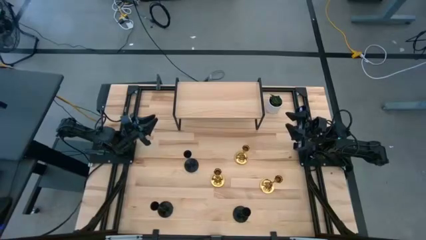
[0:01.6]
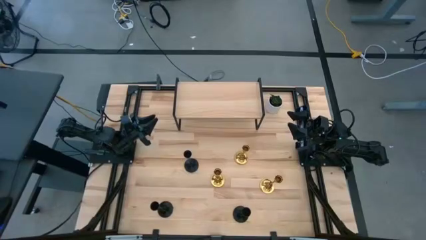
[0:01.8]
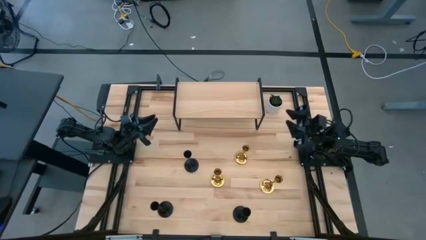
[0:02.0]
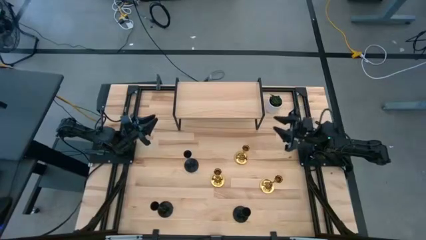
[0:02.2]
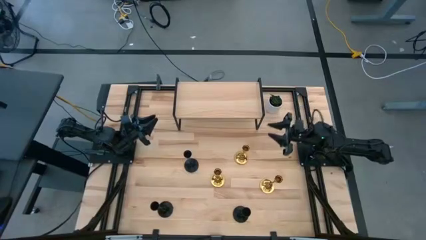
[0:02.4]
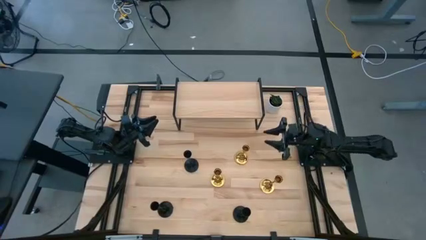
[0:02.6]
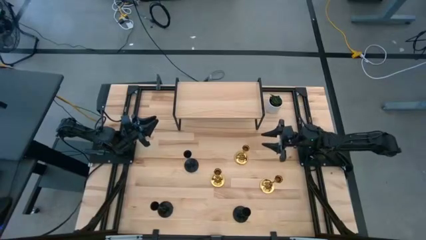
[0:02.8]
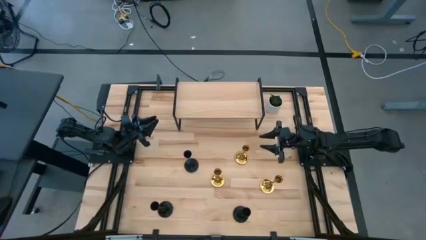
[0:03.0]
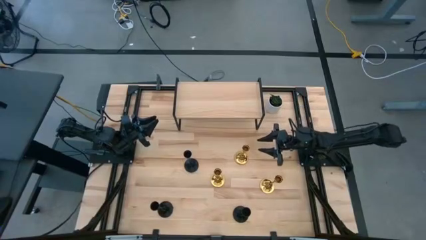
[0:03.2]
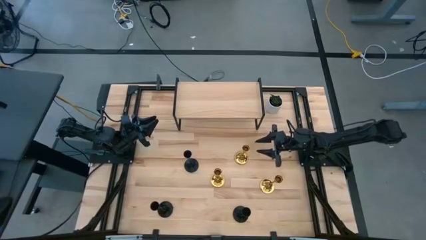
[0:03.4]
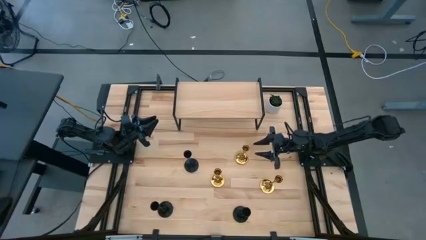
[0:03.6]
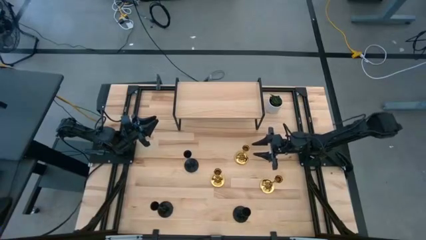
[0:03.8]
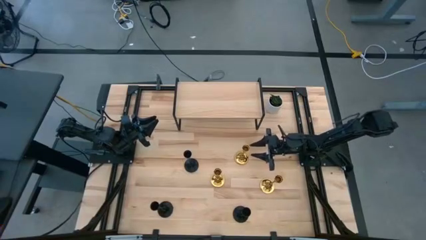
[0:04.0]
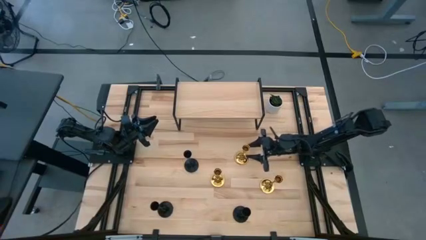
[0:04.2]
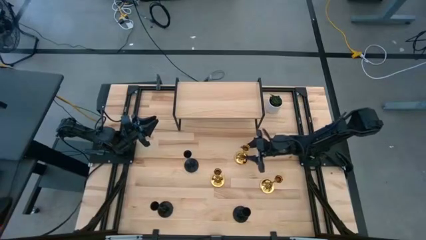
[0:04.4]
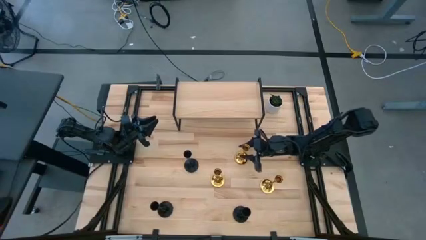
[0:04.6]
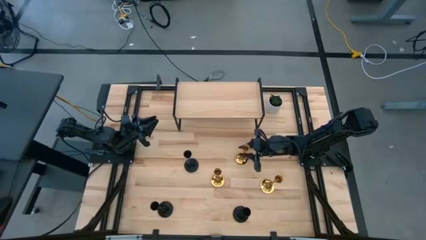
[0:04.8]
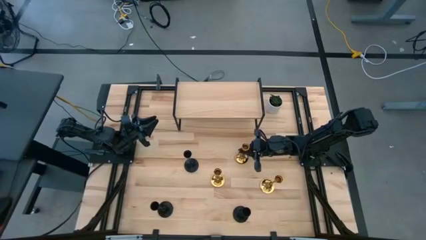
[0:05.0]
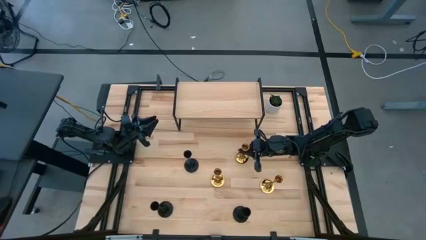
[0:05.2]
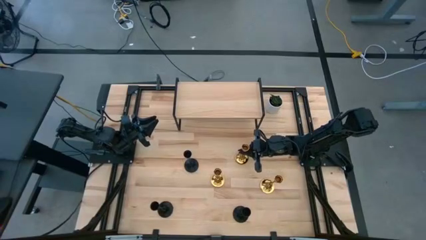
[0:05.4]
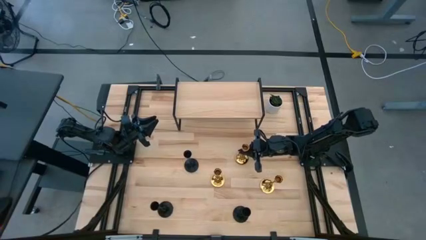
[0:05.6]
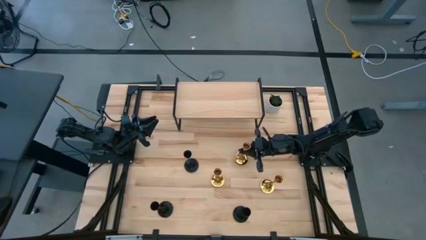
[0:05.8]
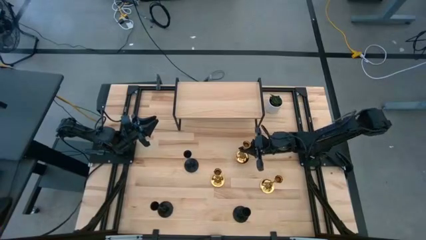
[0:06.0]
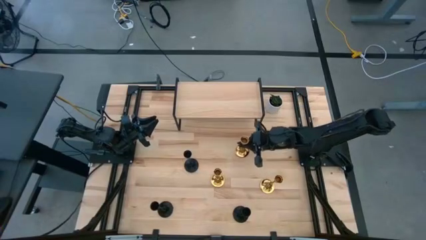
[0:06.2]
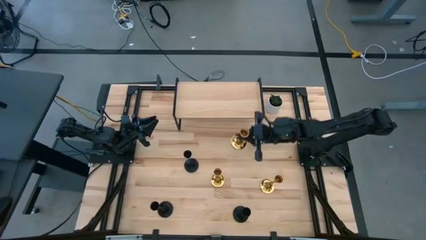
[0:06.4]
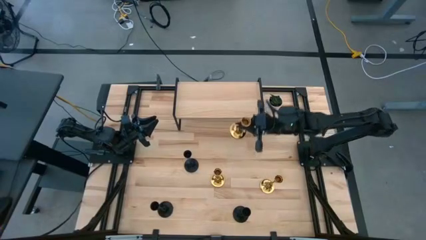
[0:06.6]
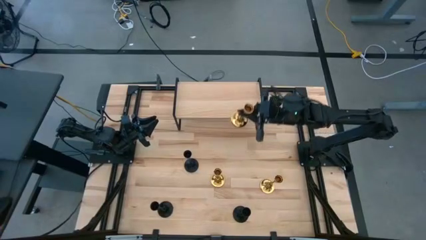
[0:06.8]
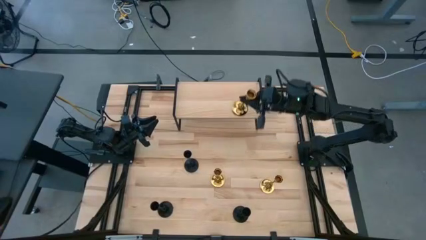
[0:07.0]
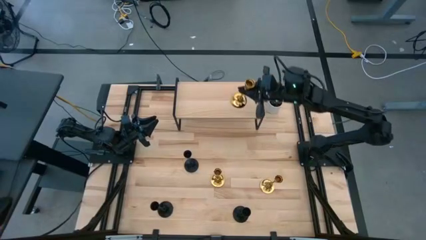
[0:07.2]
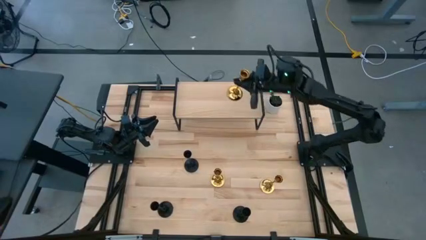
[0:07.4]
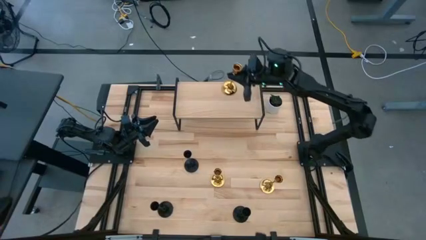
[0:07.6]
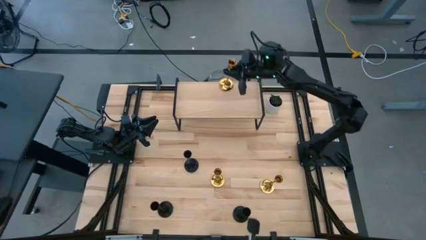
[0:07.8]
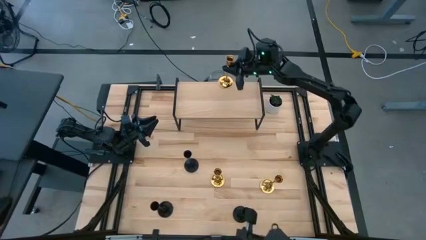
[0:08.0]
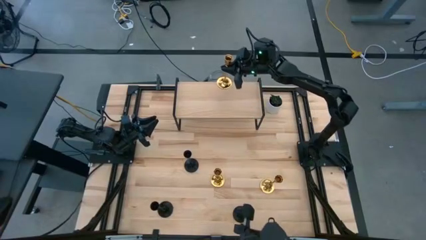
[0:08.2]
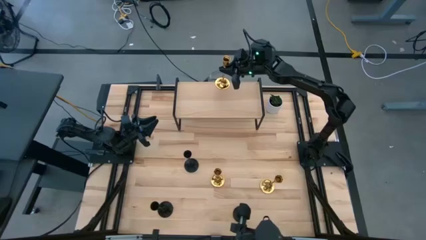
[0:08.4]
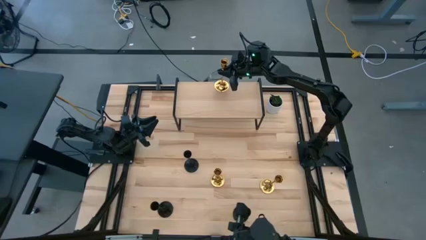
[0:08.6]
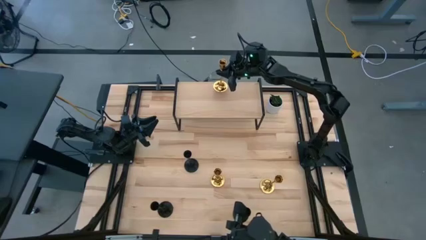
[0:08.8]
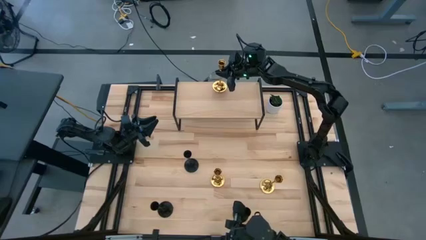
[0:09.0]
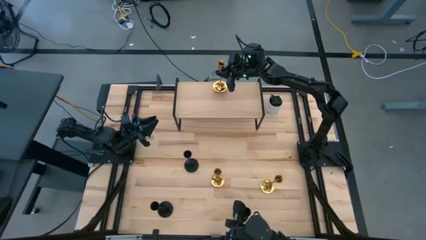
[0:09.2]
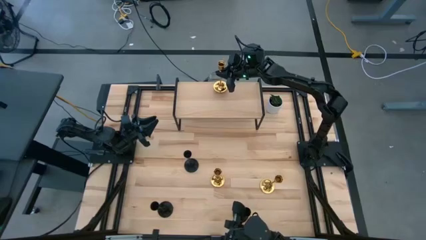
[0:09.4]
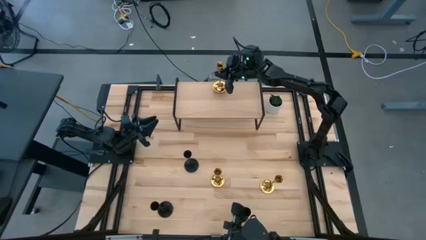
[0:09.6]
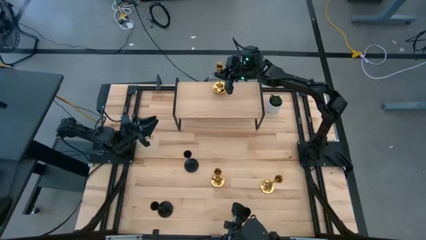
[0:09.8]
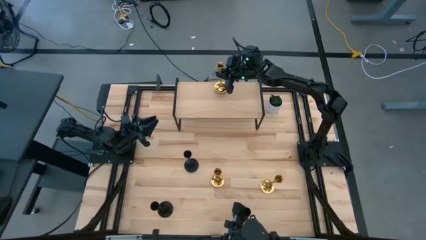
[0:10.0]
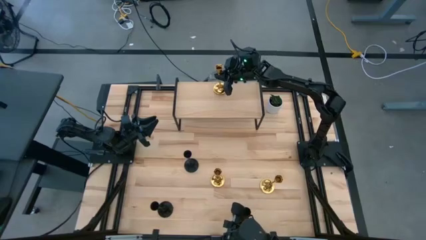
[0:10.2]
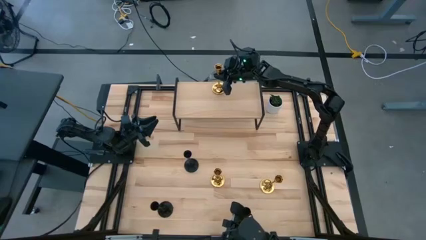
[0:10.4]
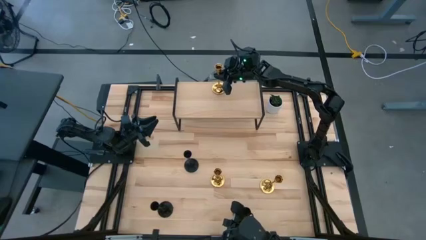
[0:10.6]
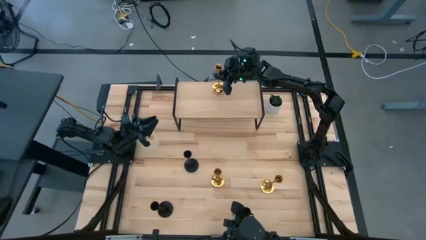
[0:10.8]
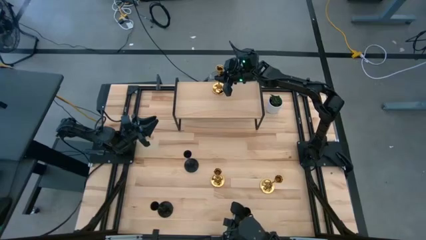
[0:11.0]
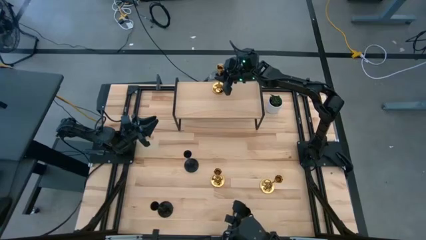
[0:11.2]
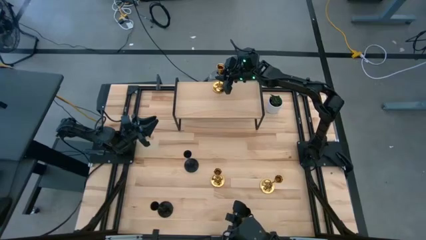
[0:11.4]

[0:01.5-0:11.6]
Task: Pick & Place candle stick holders
Put the top gold candle holder on the shelf
